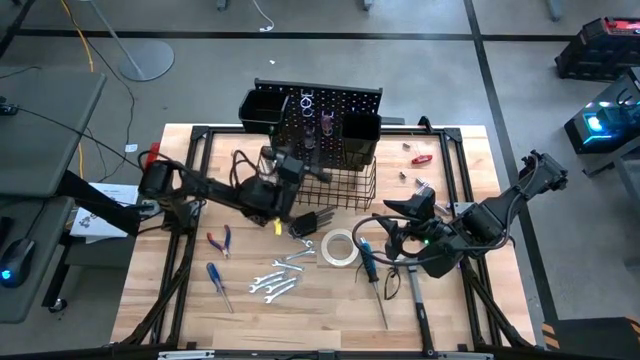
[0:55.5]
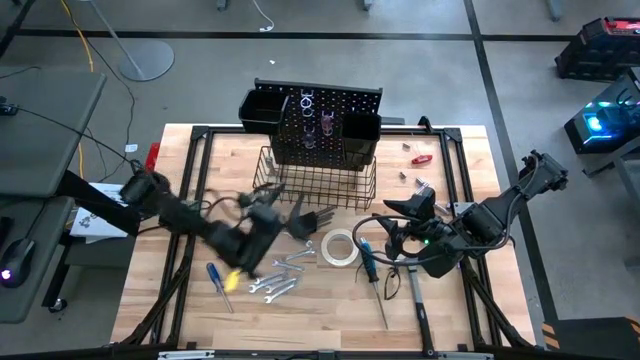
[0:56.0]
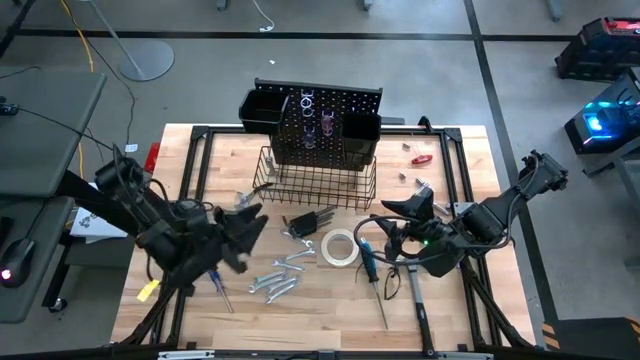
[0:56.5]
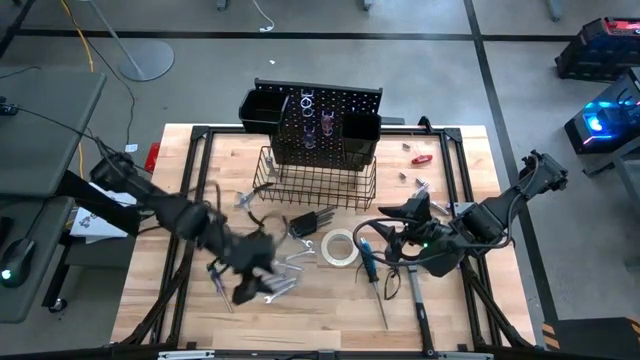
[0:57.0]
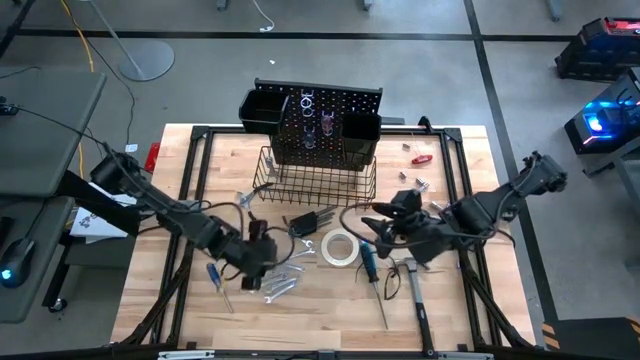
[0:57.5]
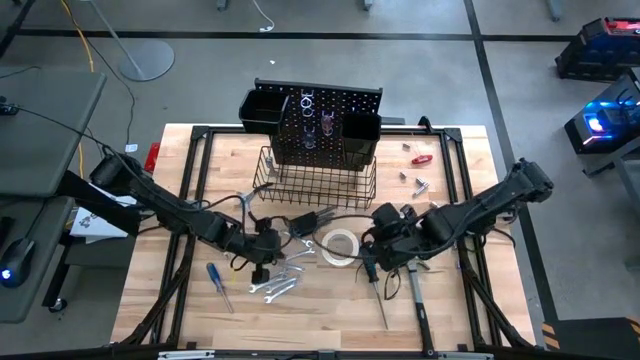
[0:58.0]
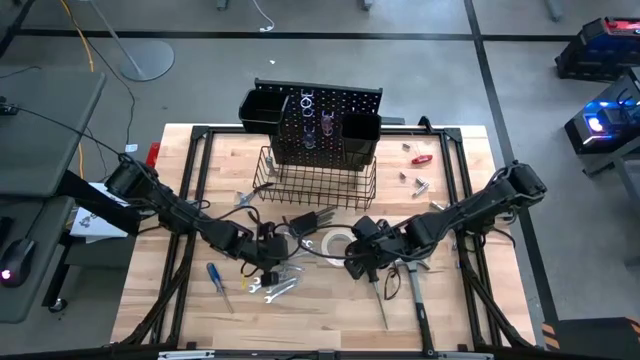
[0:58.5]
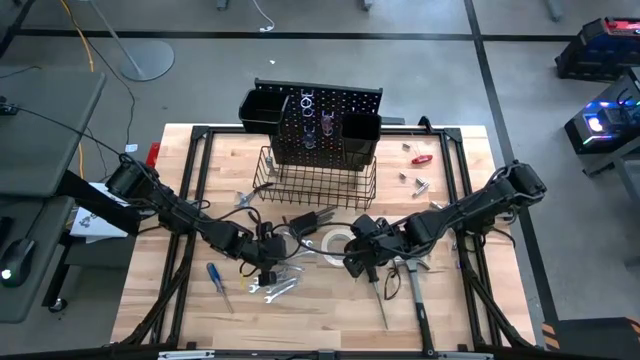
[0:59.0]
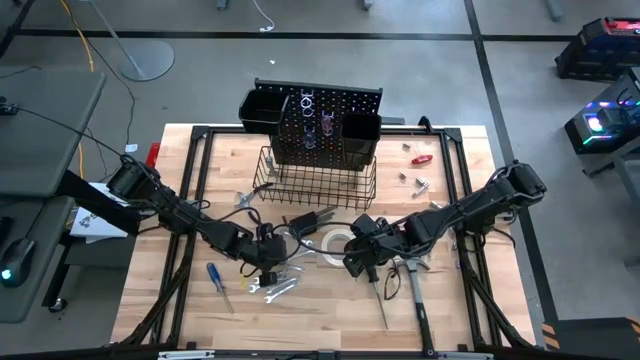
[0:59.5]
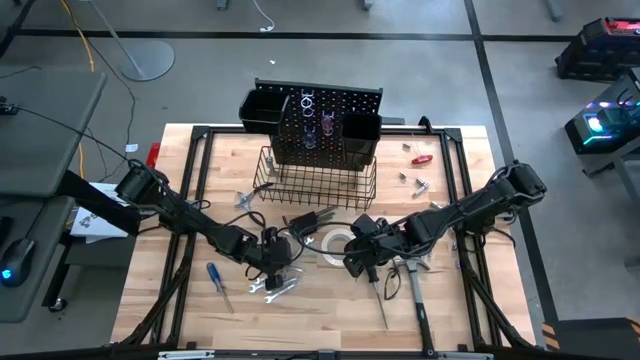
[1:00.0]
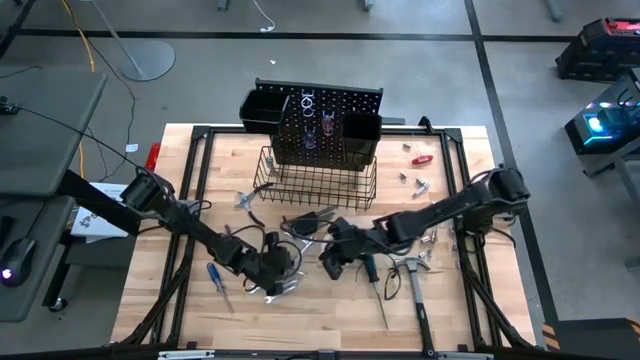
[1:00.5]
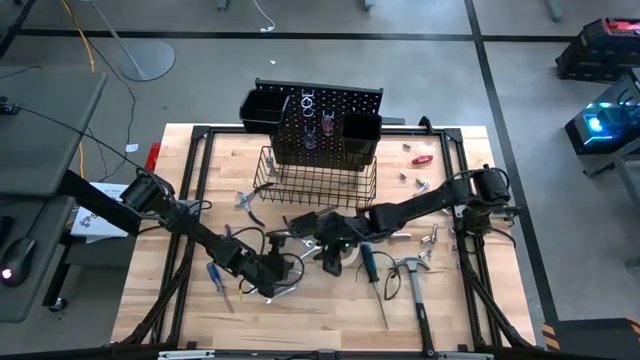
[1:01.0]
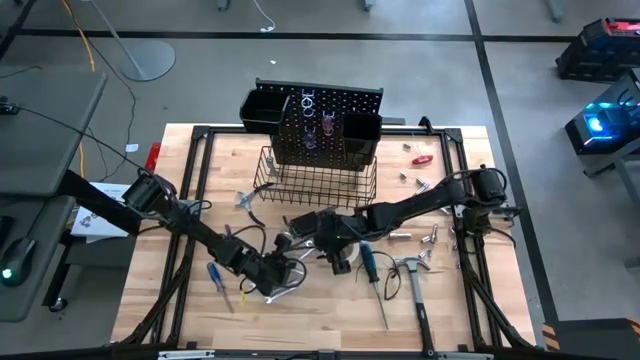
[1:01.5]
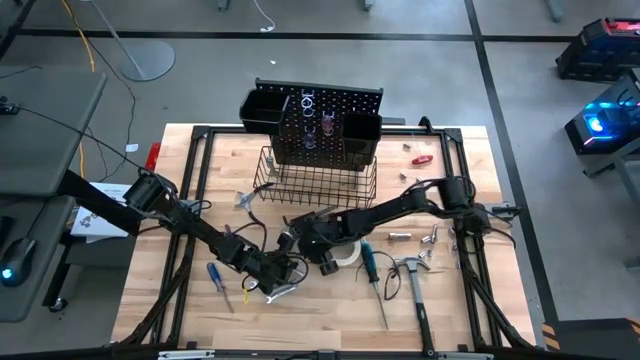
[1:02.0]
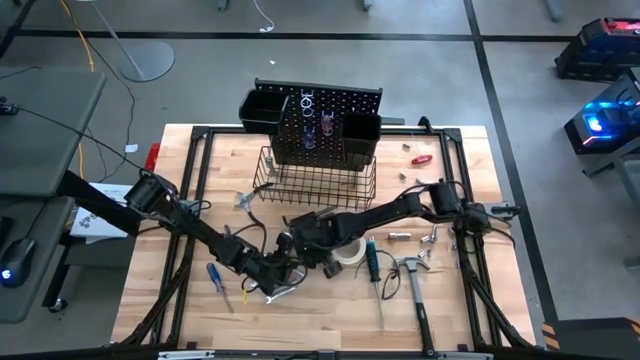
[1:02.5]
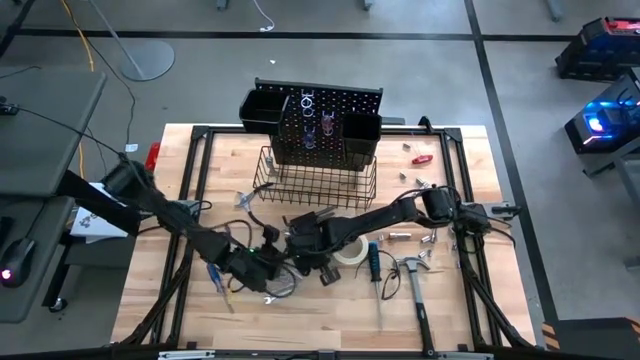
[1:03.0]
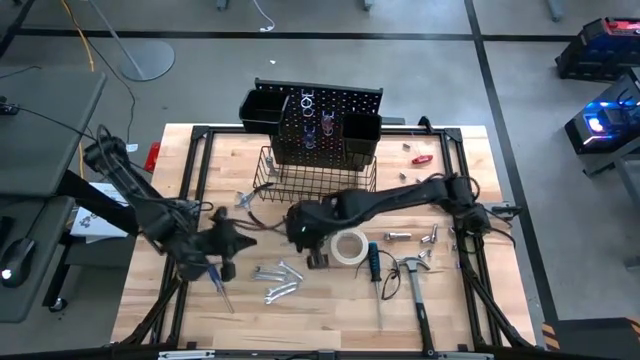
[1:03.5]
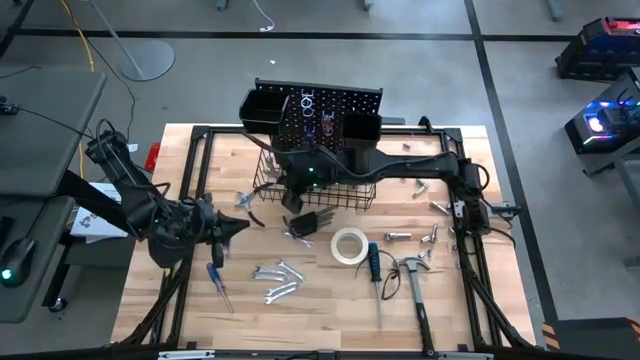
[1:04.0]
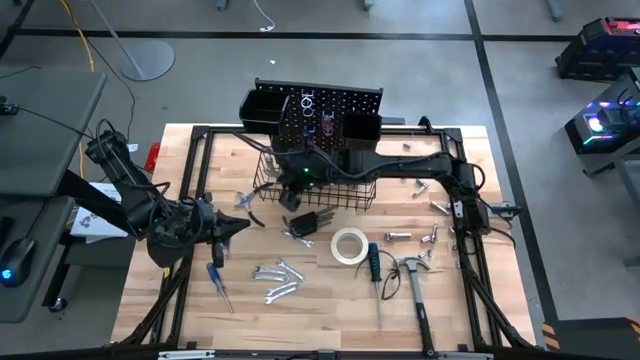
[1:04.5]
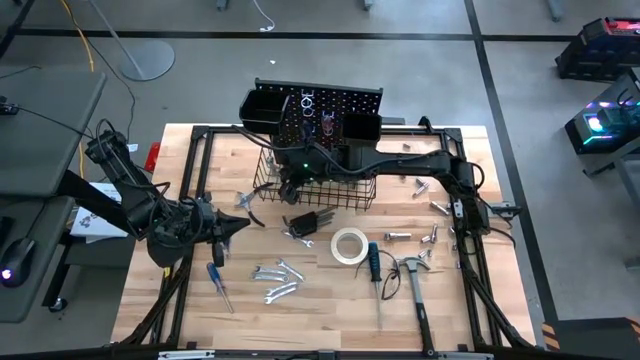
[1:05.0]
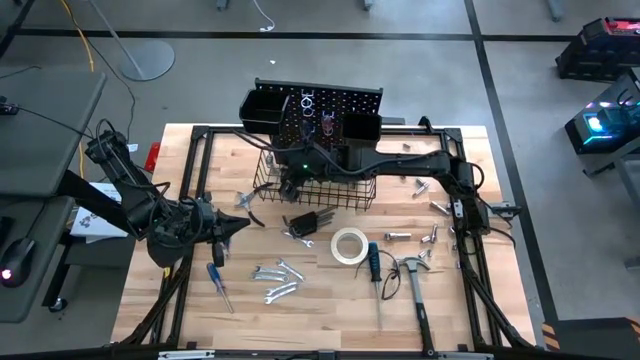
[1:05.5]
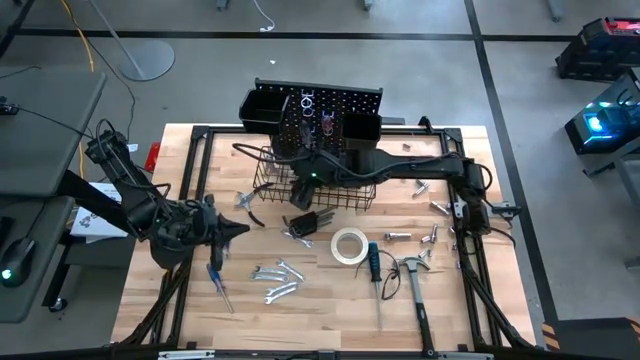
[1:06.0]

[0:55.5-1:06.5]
Task: Hang tools onto peg board
Hang the wrench on the pegboard

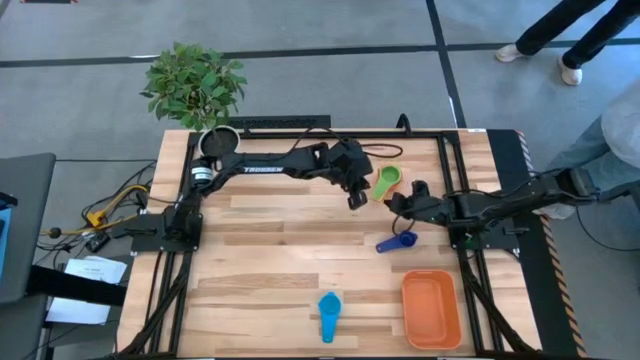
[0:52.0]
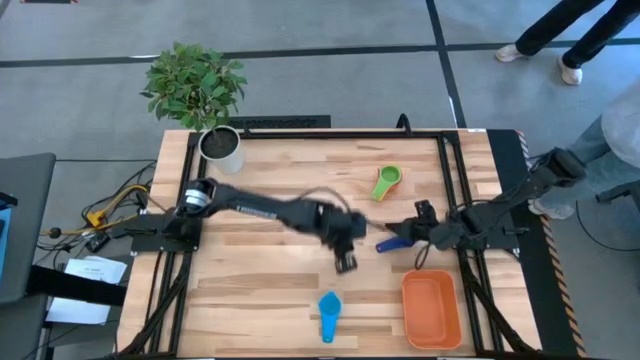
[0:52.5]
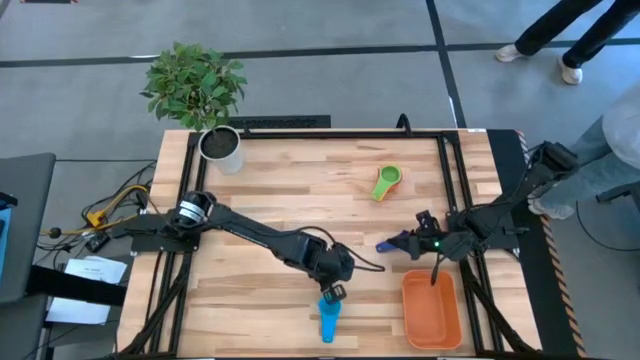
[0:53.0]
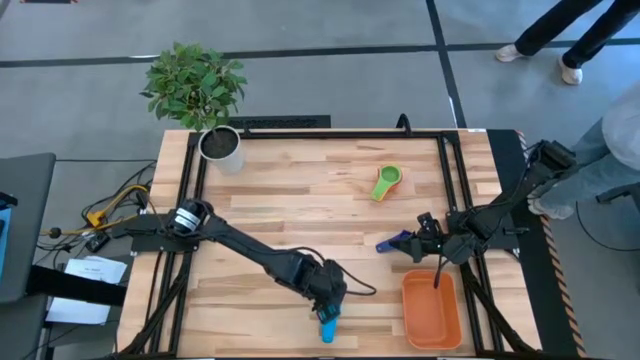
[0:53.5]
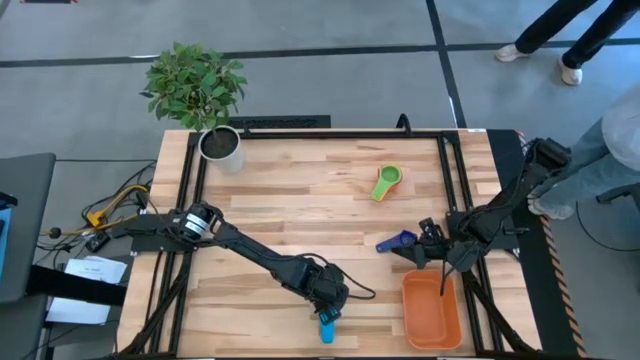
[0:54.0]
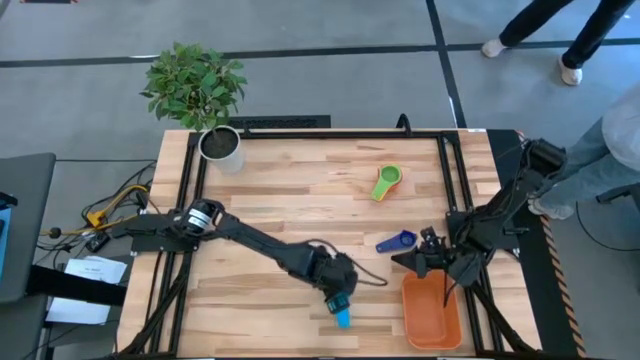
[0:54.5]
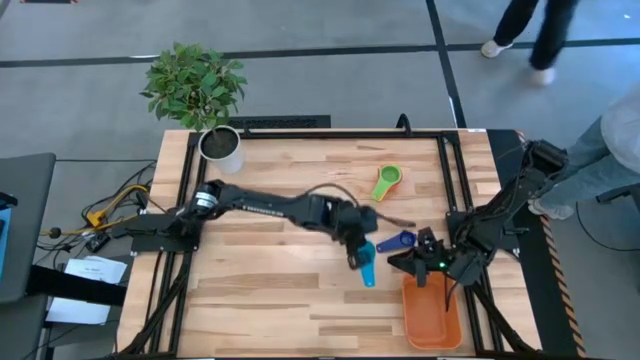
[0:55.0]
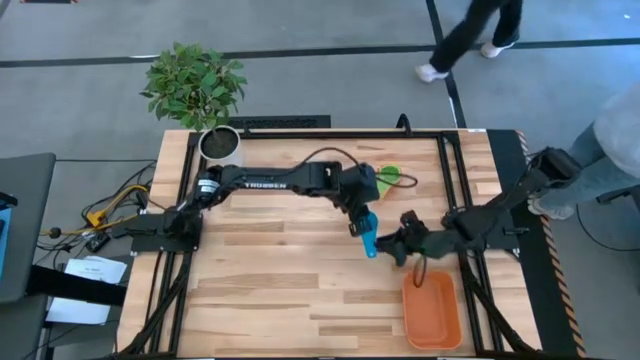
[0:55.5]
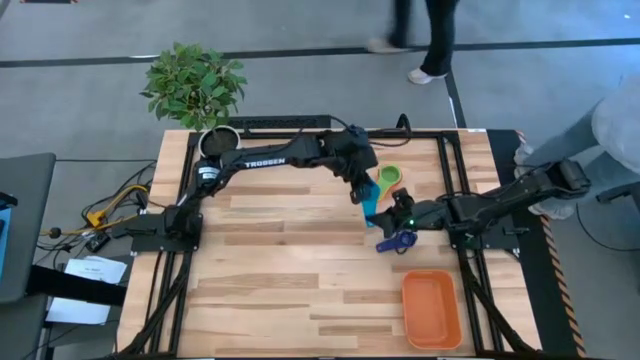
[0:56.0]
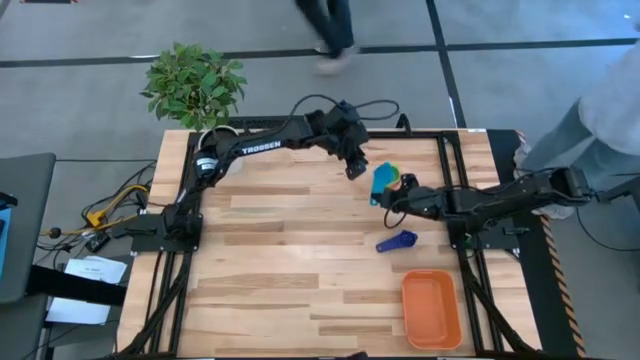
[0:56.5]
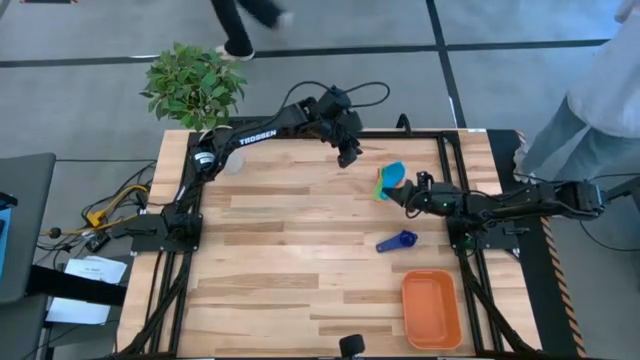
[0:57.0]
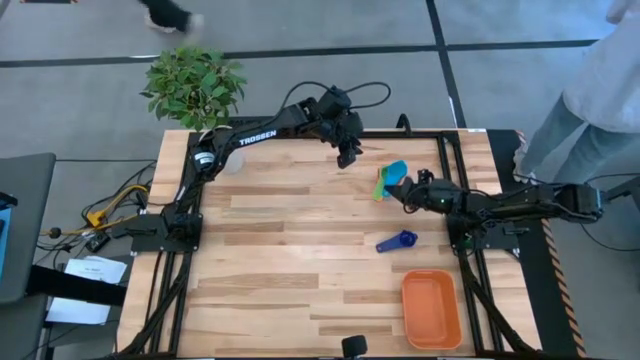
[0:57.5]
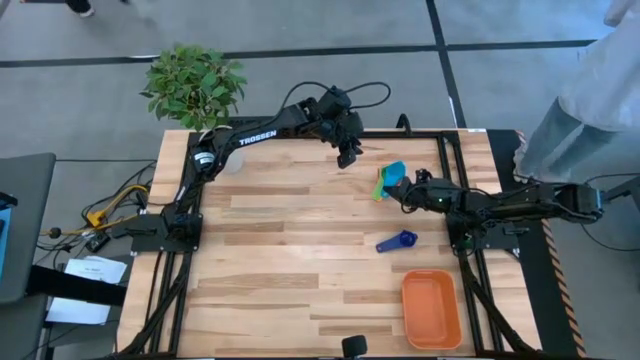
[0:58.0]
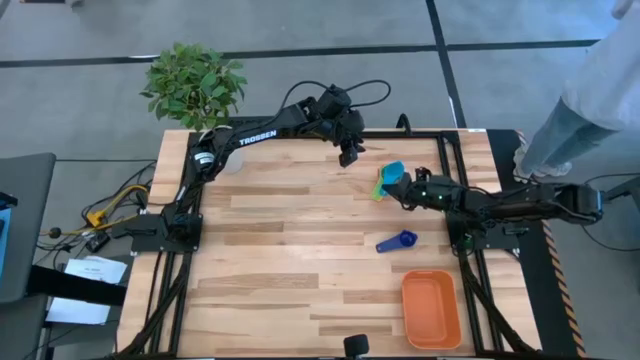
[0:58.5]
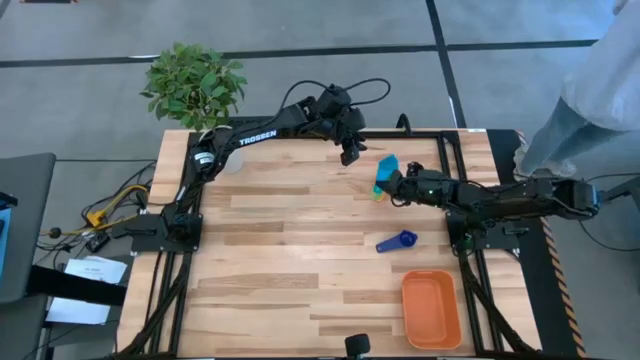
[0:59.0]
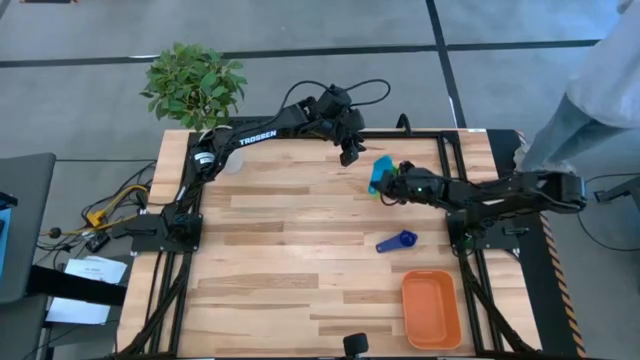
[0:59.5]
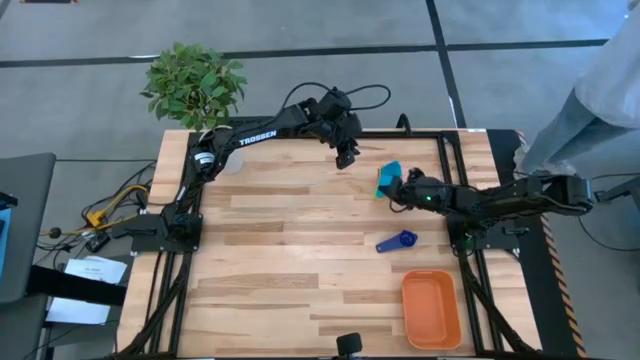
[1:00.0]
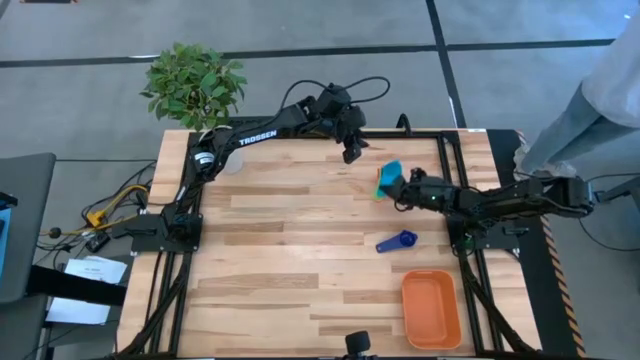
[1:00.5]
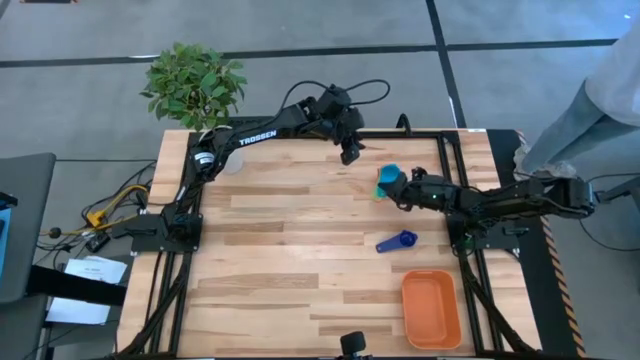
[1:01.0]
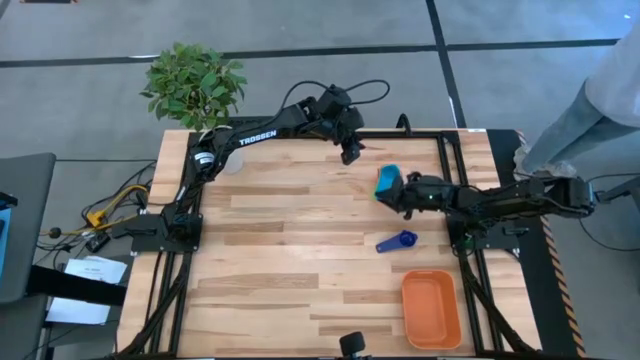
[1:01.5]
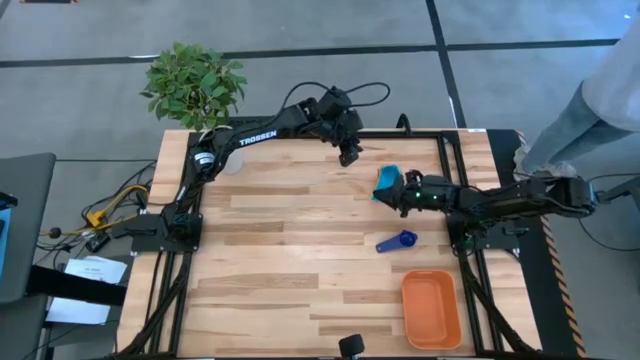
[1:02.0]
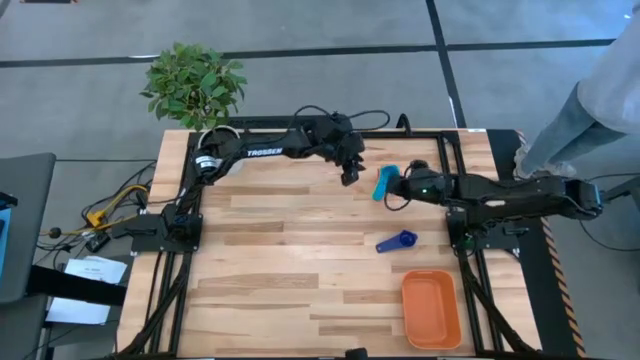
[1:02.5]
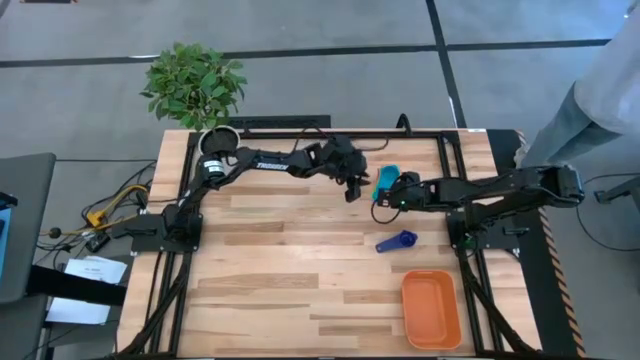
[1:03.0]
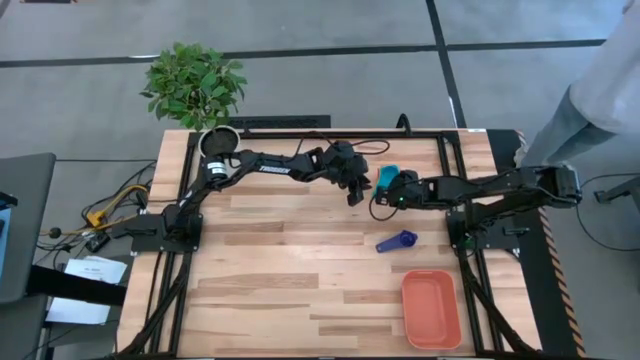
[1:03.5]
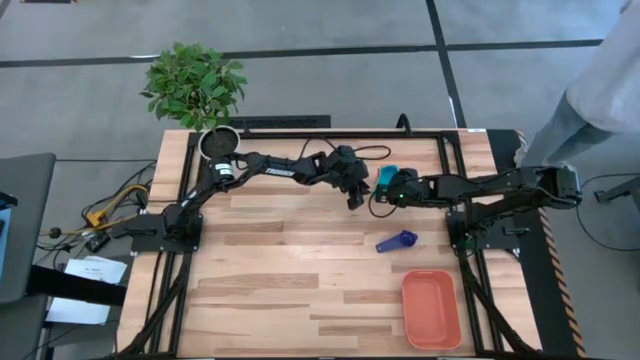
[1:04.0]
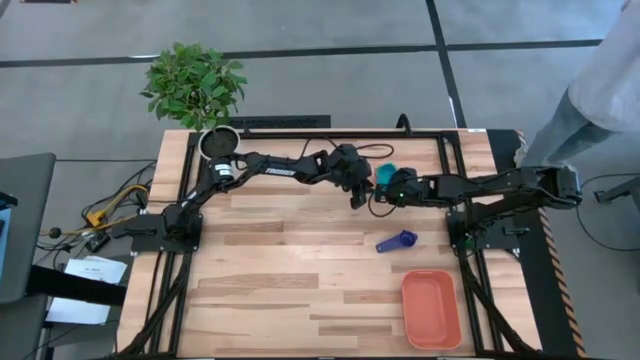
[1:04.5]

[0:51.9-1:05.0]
Task: Nest measuring cups in basket
Stack the light blue measuring cup on top of the green measuring cup
